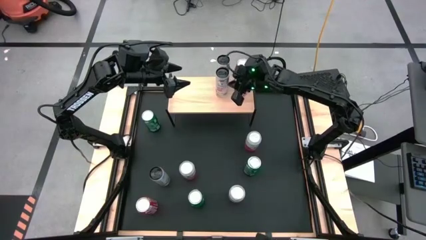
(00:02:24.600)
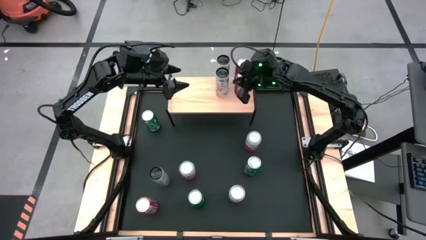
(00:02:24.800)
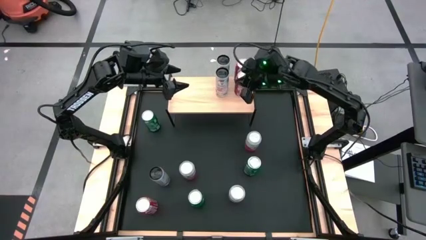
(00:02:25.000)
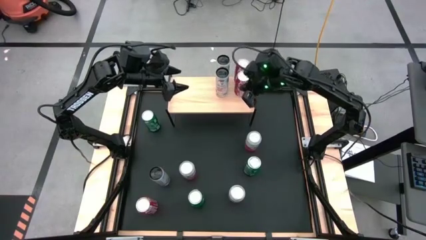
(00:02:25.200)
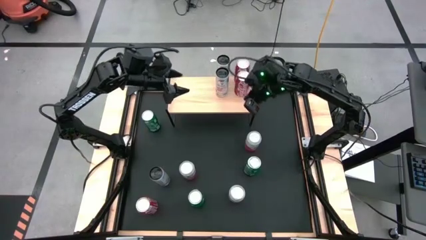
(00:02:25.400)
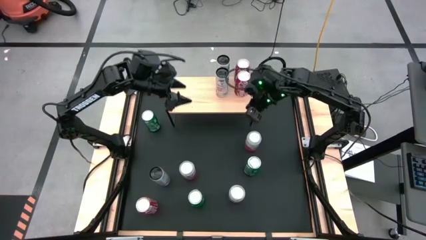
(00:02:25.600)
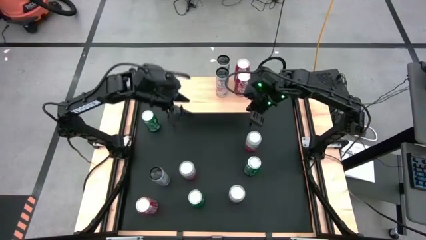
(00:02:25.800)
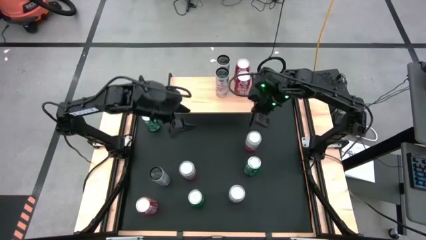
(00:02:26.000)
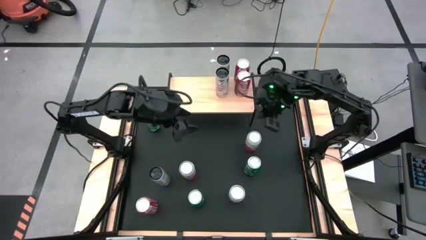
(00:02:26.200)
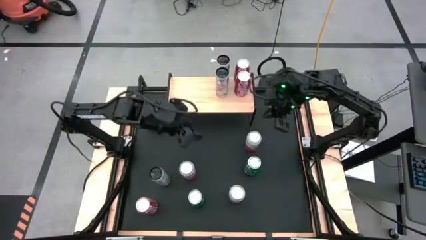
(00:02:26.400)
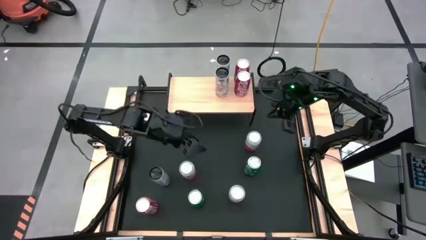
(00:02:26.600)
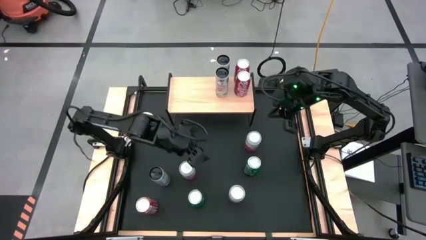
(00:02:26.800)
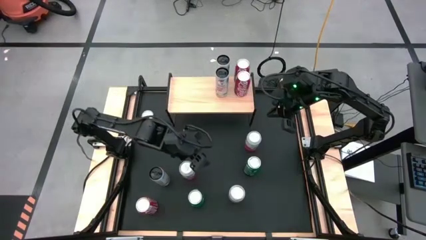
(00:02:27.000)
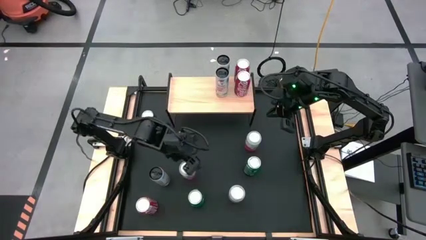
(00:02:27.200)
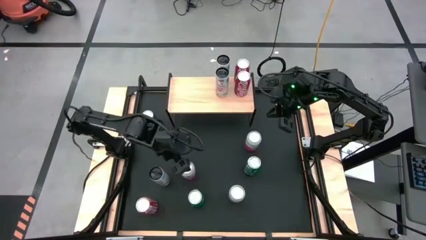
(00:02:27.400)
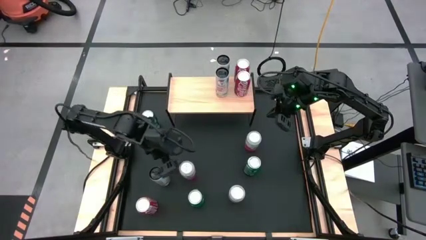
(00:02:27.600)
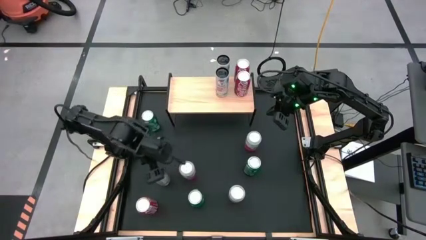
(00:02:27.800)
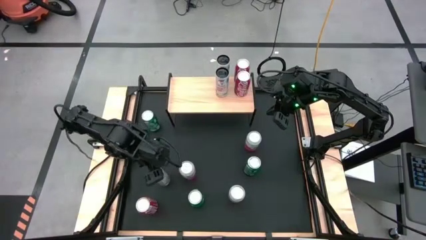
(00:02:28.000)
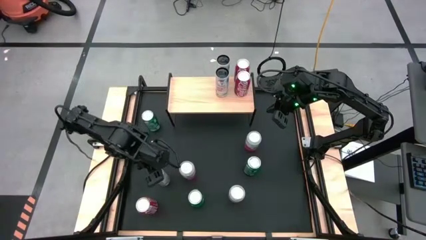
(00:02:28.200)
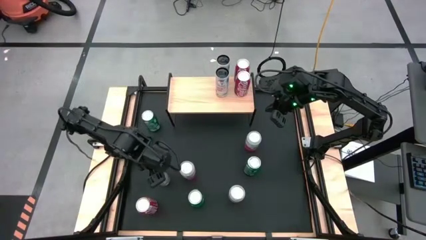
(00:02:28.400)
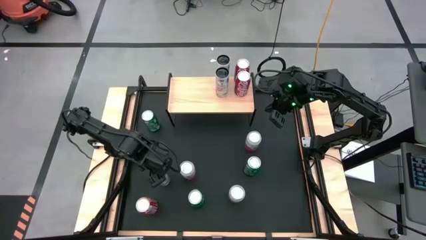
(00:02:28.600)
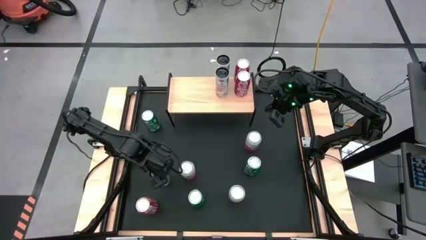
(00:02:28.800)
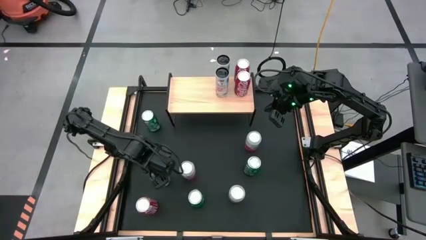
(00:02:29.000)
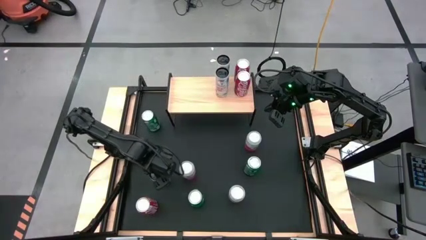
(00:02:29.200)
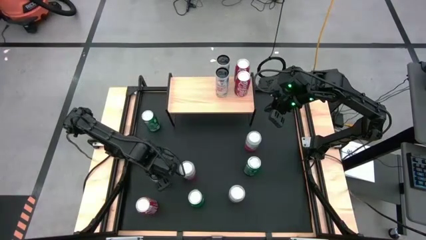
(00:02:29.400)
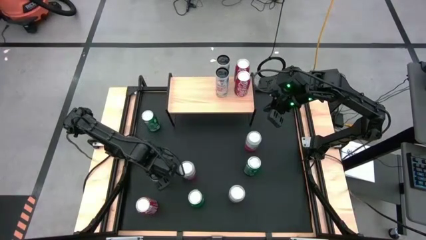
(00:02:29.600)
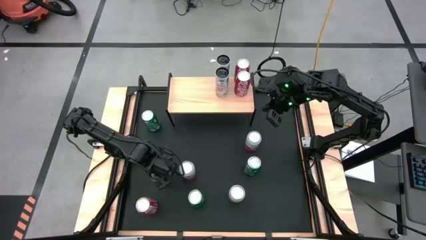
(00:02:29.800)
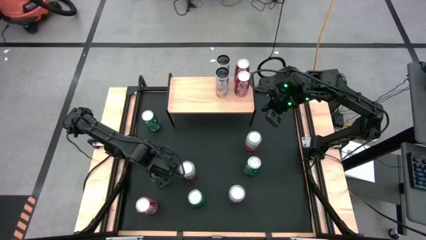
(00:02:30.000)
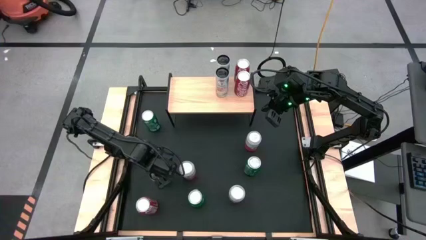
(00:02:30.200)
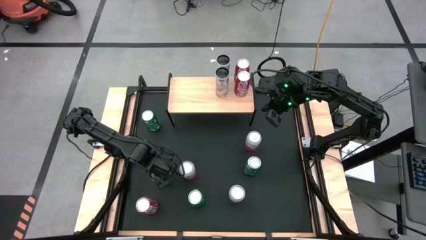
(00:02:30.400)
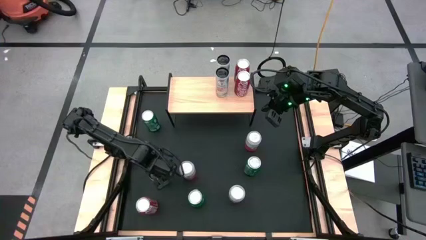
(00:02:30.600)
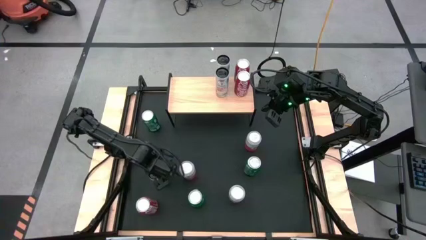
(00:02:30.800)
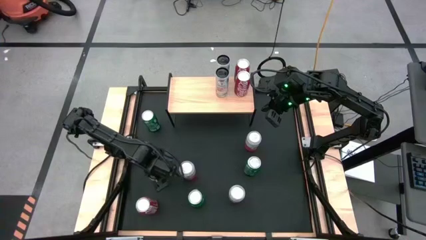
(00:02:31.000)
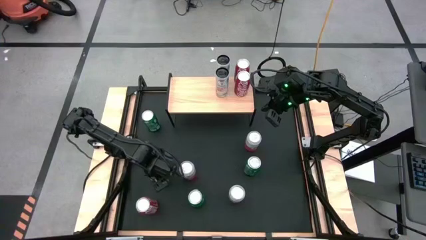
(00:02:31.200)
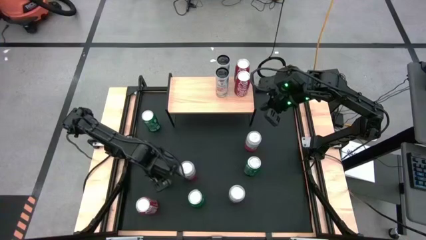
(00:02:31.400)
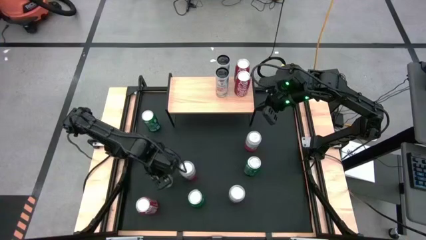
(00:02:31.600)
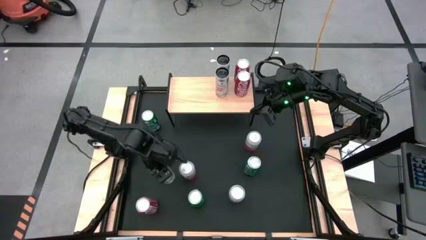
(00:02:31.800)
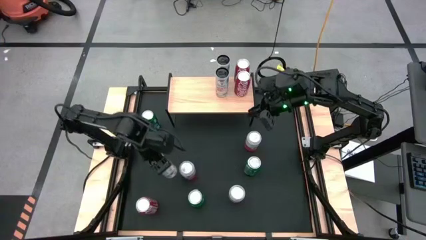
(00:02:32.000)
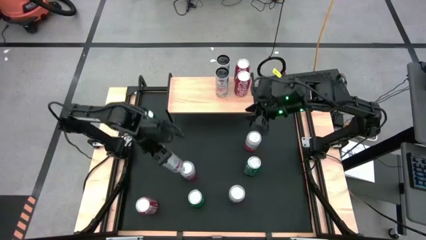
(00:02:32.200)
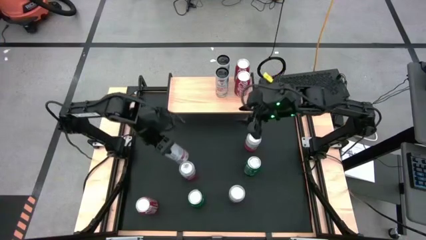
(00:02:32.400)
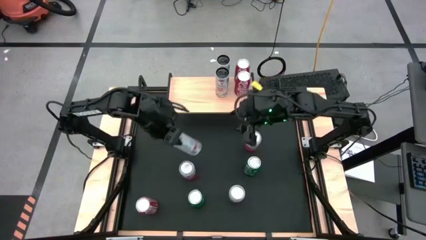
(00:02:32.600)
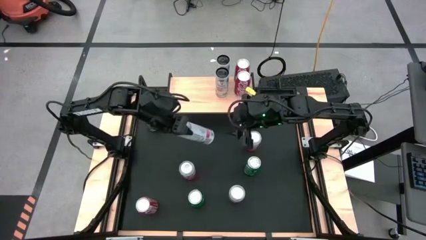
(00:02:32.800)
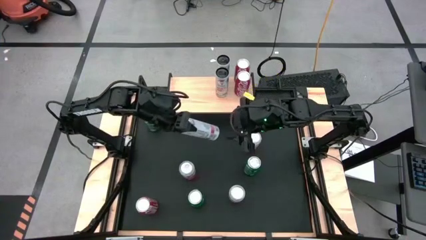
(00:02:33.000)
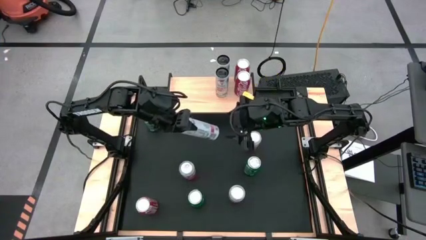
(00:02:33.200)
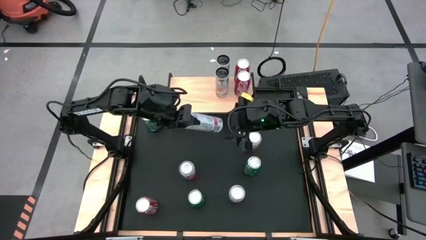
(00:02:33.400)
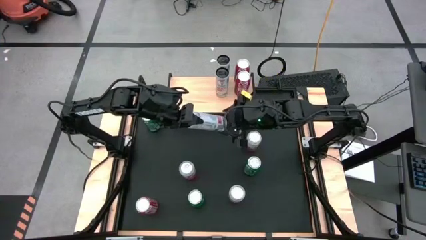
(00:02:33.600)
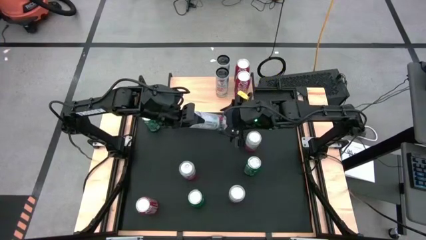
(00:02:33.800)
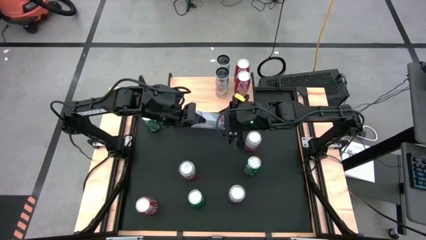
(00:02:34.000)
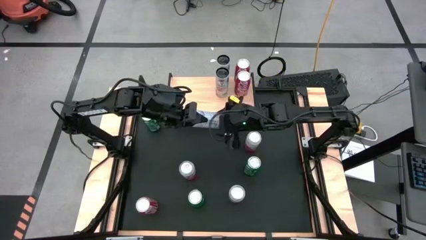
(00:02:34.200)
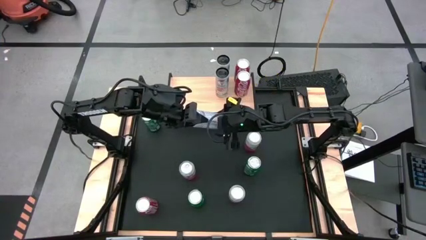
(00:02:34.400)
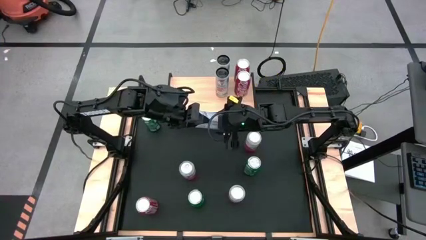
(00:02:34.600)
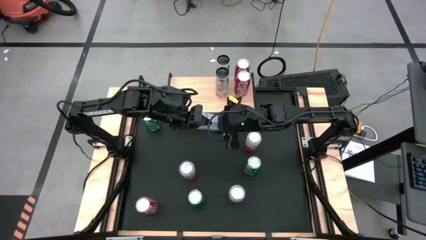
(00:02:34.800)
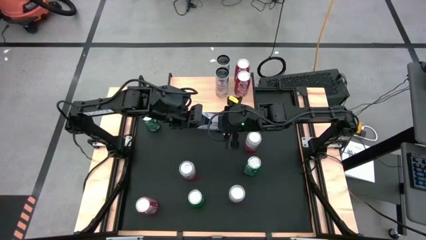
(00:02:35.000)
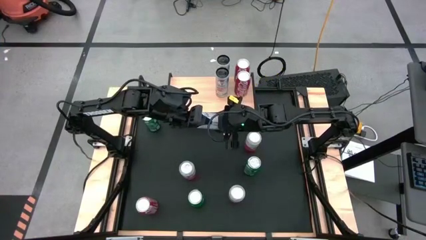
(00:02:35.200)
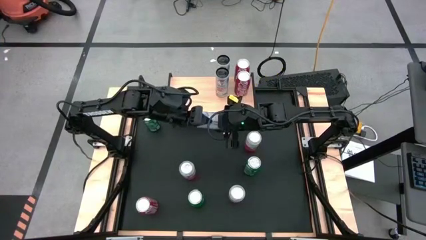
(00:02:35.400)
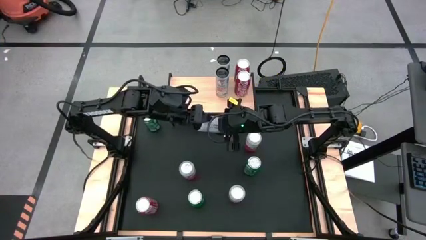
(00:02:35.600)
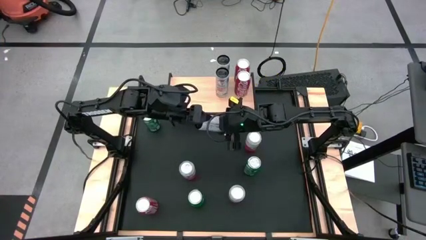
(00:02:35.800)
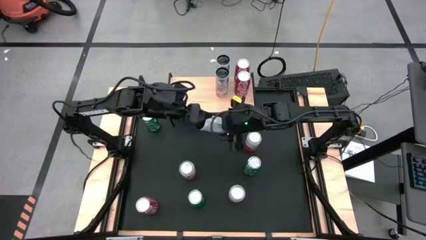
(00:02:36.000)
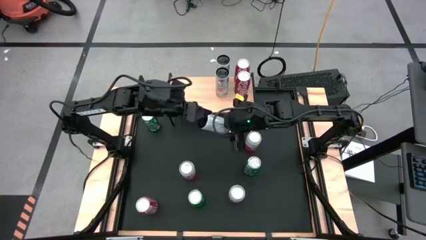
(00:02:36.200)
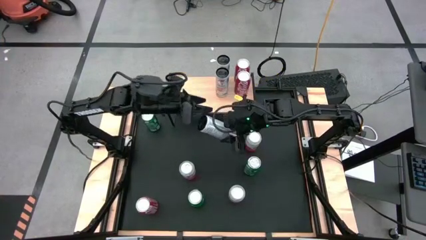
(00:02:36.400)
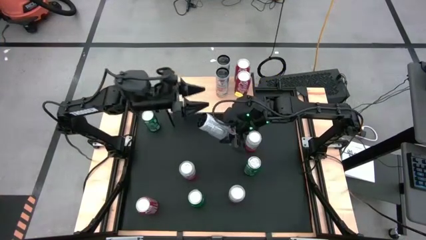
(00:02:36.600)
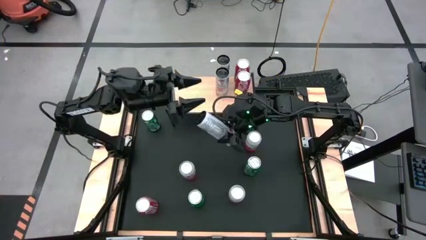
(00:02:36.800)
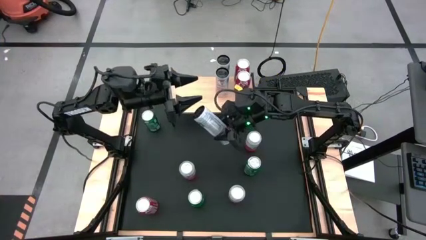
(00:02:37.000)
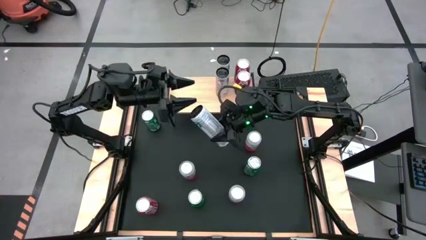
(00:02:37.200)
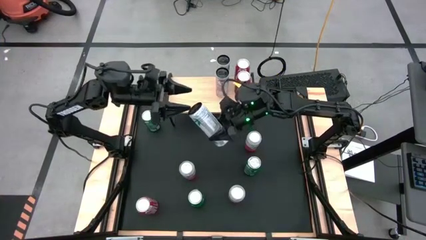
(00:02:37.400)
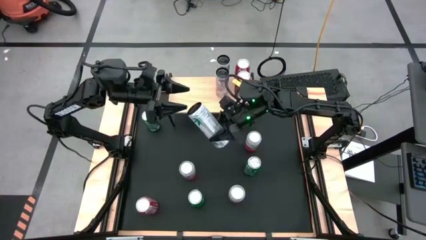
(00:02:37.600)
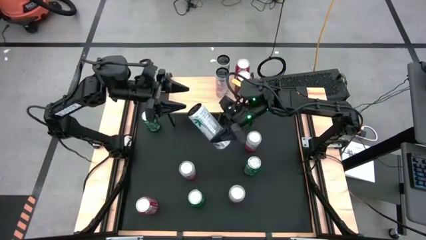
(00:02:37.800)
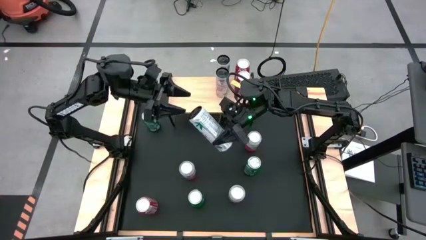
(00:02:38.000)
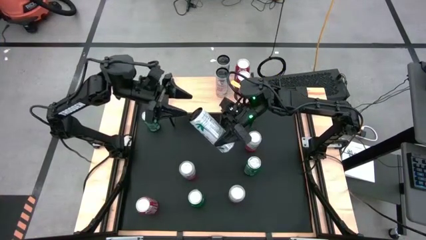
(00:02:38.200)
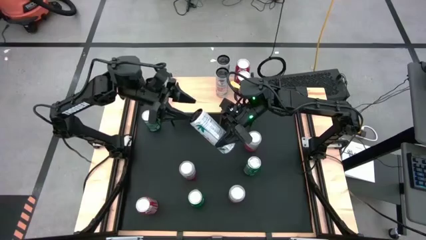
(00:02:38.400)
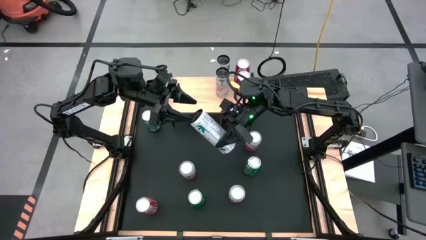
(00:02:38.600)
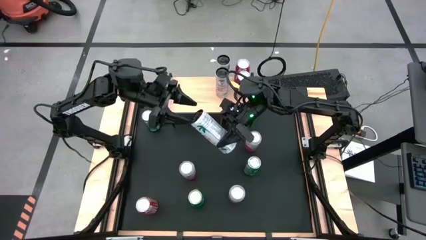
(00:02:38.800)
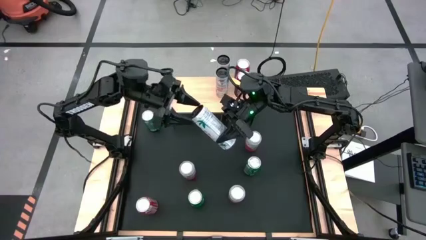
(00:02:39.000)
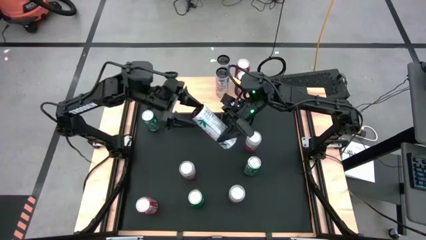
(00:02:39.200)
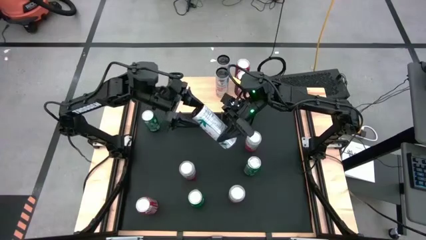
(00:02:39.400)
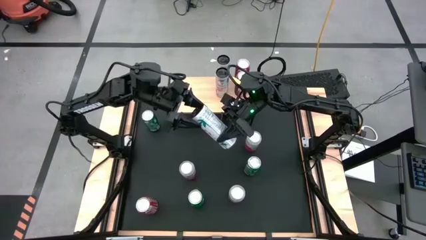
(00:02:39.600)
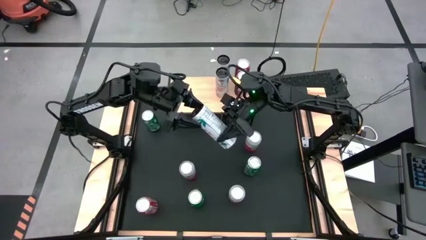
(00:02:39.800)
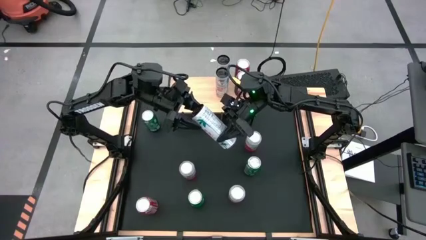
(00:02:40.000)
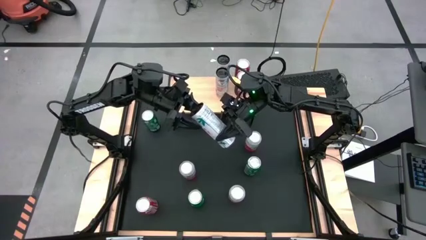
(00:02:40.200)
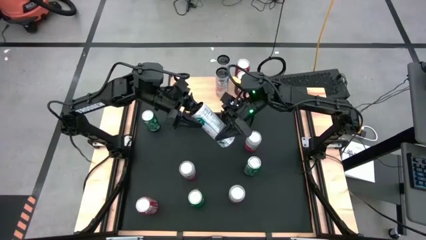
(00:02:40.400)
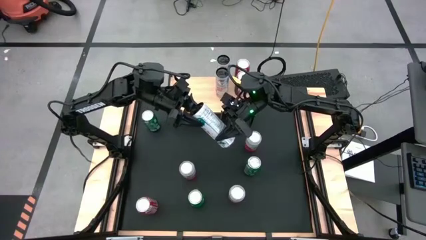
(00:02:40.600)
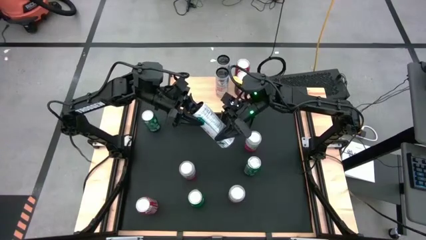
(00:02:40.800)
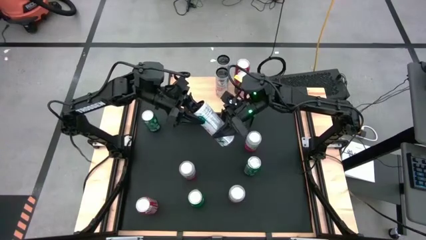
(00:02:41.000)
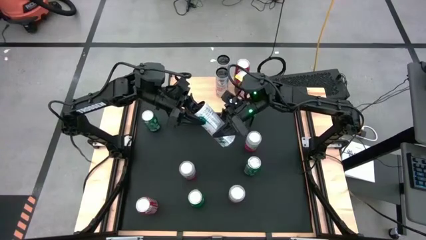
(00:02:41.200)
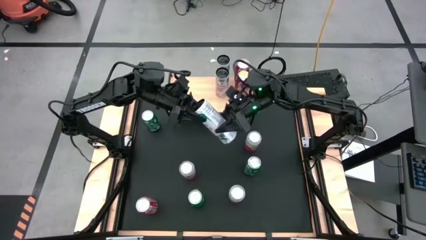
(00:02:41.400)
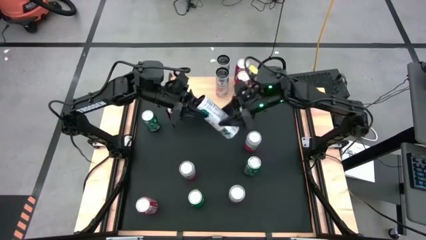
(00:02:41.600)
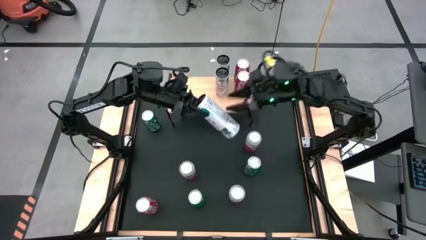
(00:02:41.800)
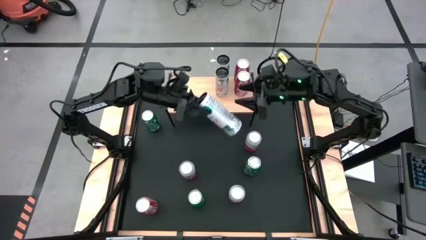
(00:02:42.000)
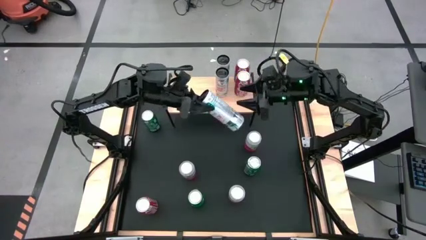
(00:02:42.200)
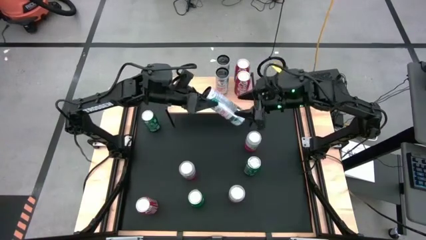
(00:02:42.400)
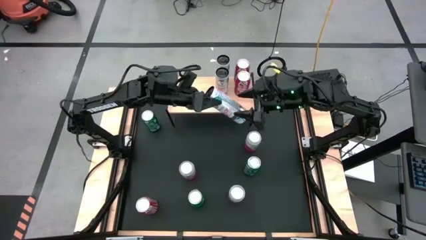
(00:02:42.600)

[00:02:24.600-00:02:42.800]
Task: Place canned beverage on shelf
Put the white pink soda can aligned with the other white pink soda cans on the shelf
